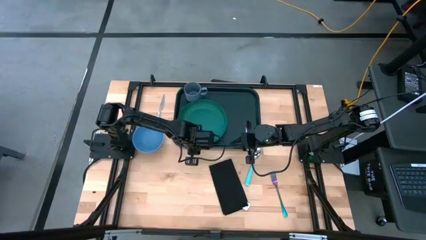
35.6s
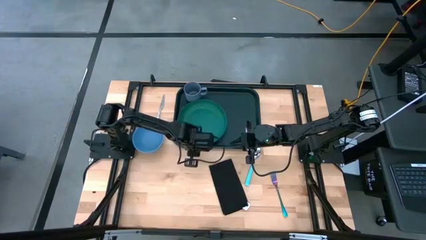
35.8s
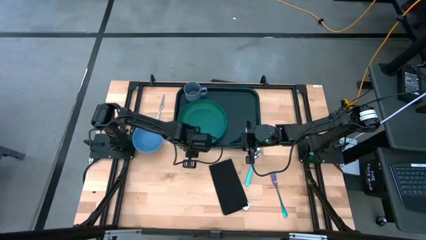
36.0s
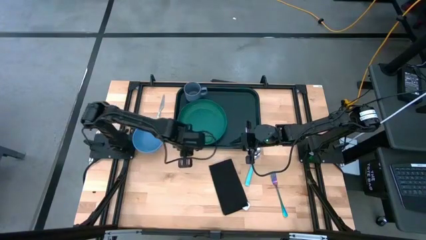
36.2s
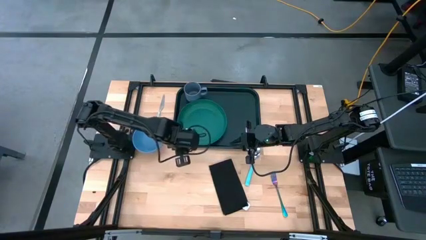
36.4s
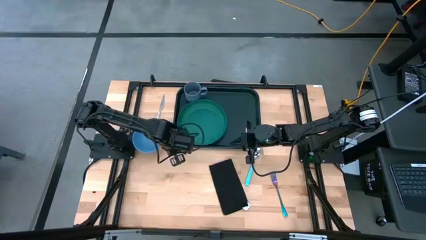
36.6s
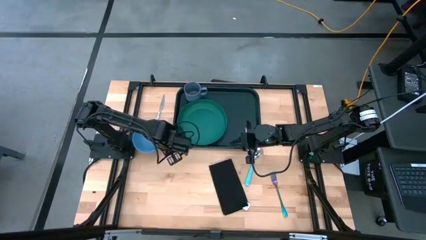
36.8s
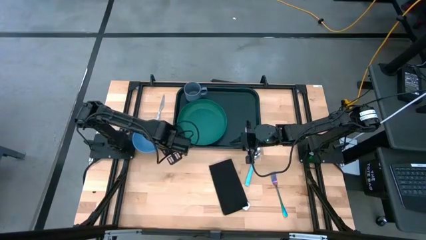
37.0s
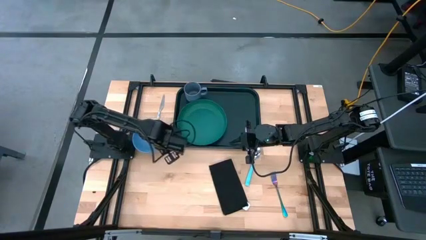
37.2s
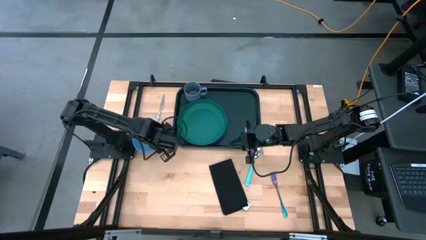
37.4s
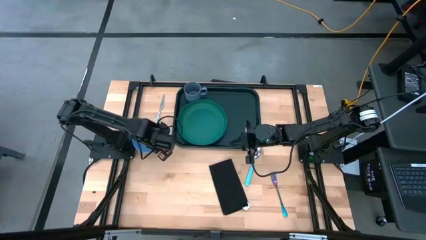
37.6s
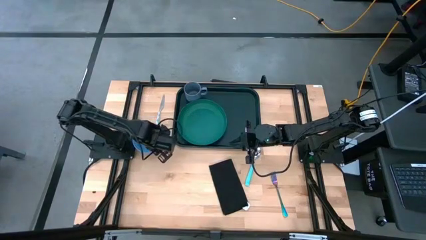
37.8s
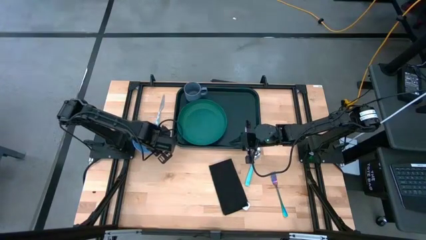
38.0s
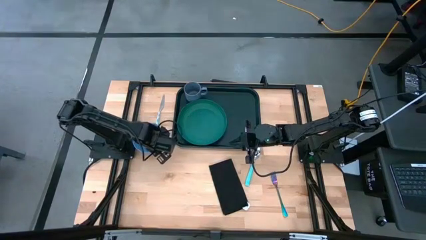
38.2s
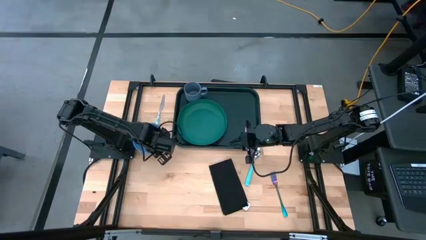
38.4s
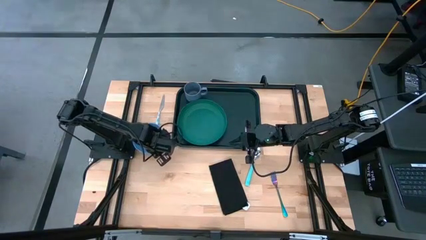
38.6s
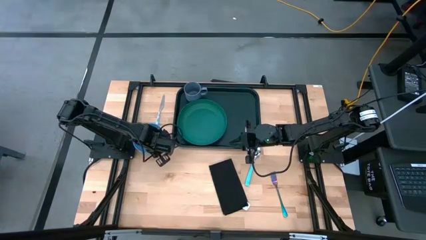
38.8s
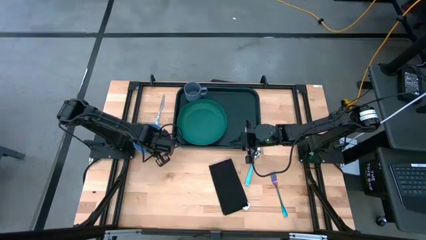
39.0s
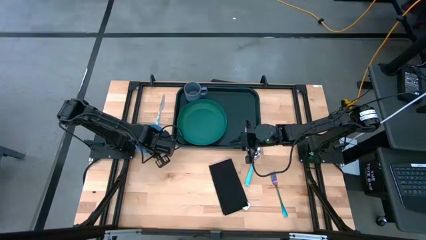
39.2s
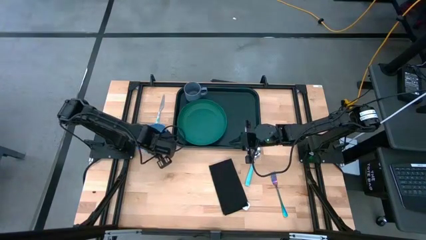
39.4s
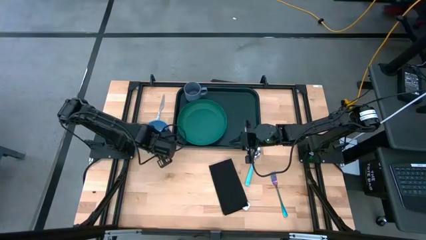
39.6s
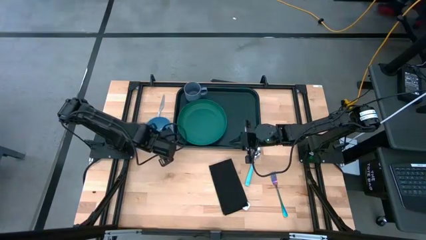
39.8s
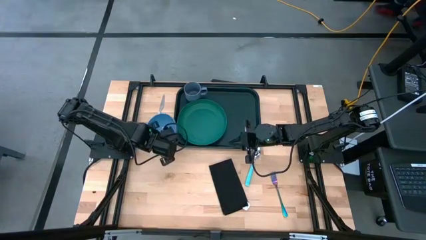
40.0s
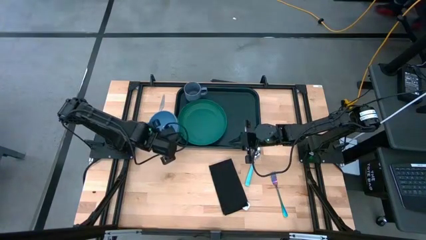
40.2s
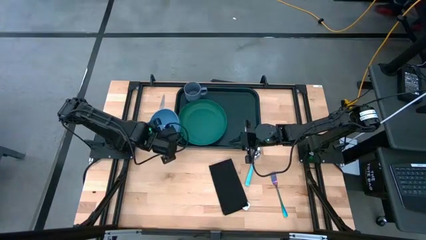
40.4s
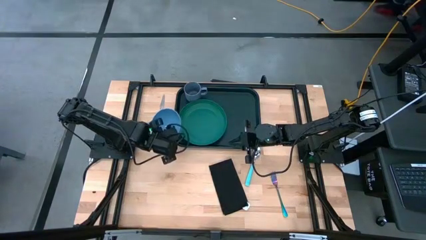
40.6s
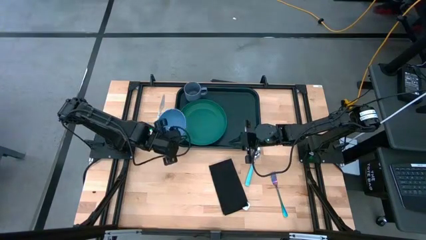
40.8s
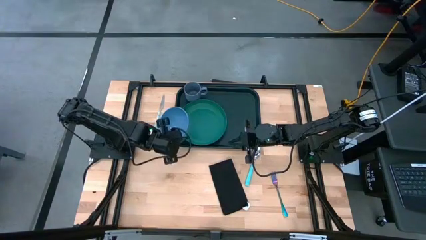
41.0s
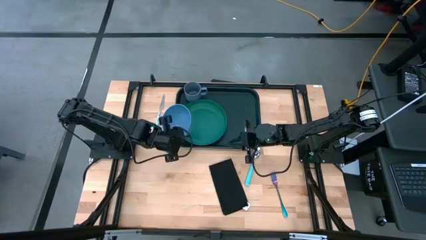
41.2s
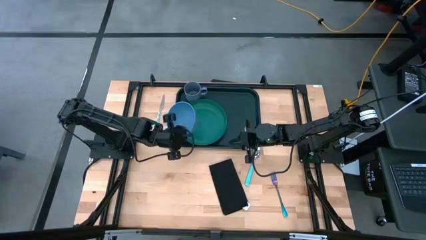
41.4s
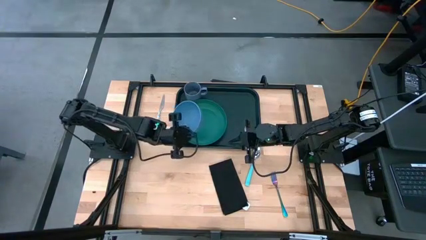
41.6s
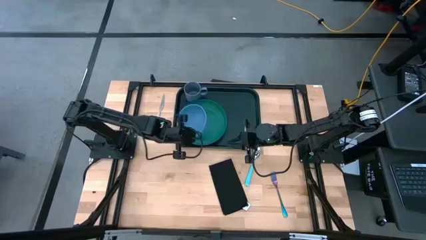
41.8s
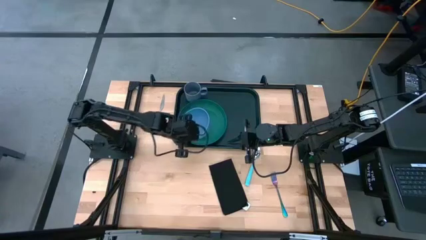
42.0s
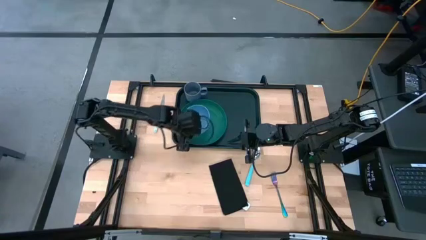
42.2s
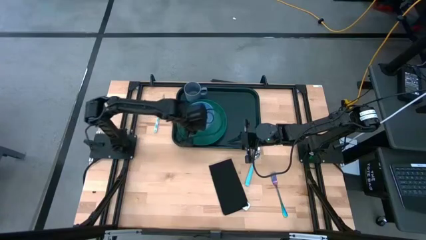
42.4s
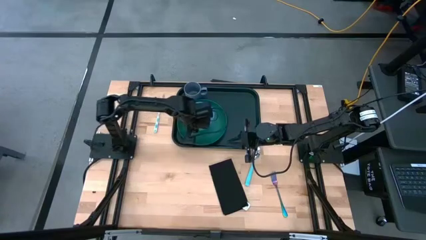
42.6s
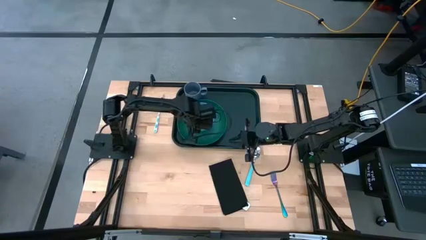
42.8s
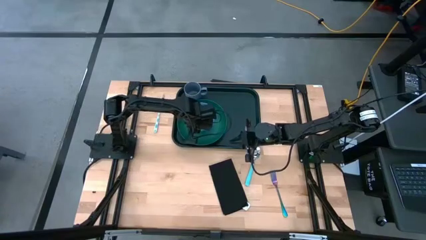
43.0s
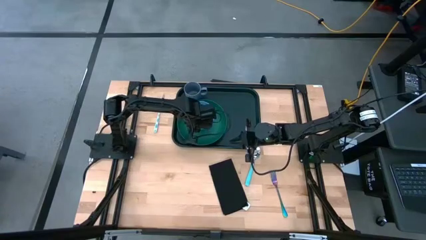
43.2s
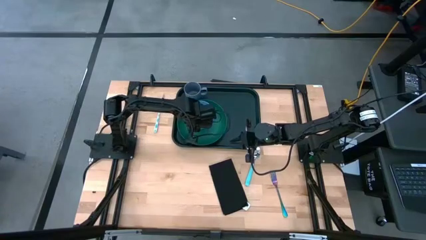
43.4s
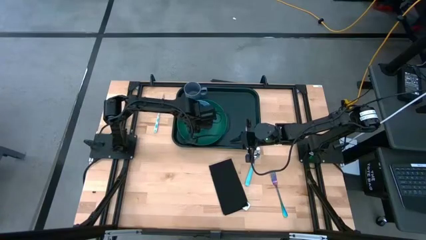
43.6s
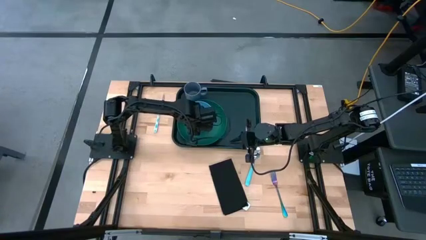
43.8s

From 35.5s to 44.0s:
Task: Set up tray
Put the blue bowl on top of the green plate on the black tray

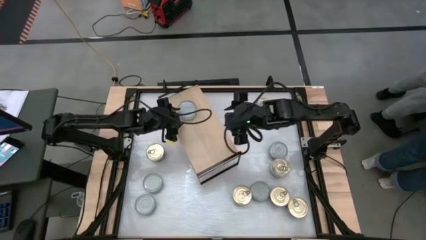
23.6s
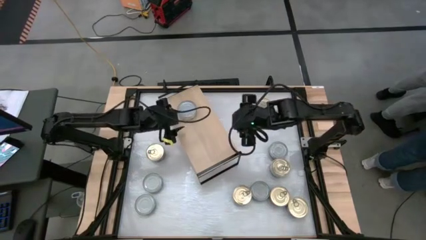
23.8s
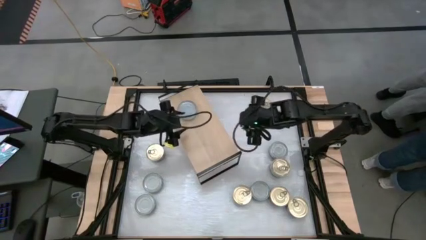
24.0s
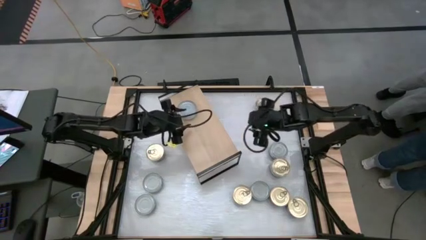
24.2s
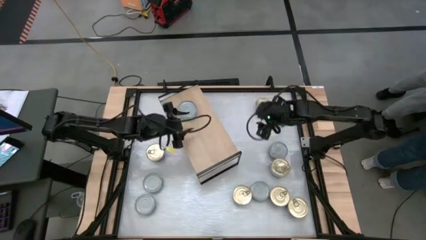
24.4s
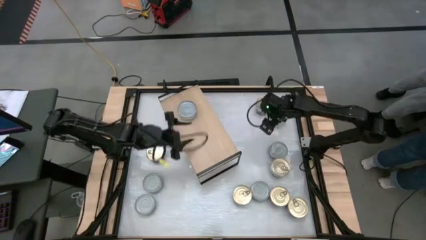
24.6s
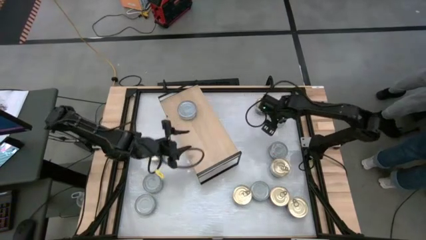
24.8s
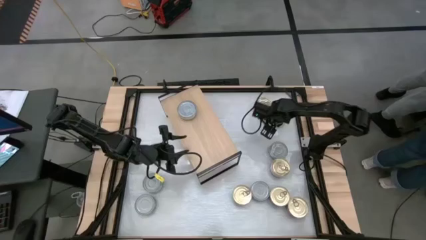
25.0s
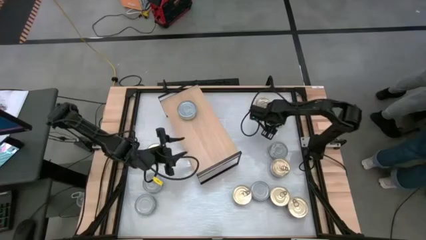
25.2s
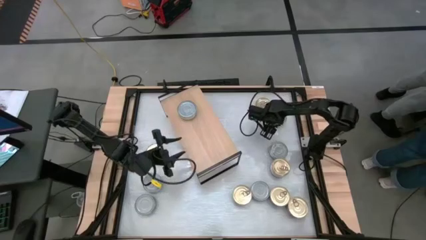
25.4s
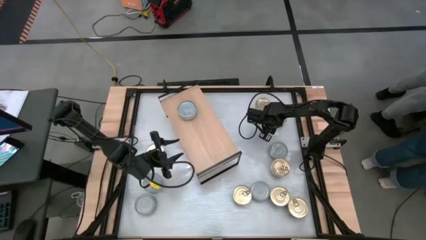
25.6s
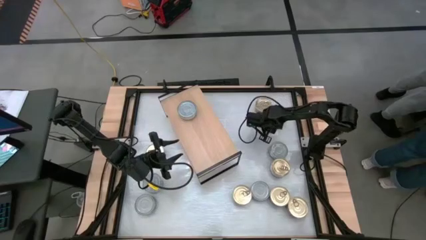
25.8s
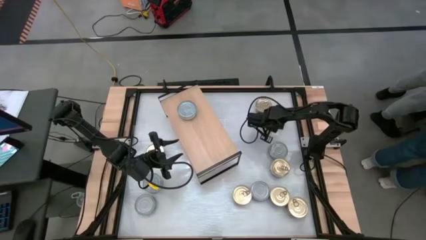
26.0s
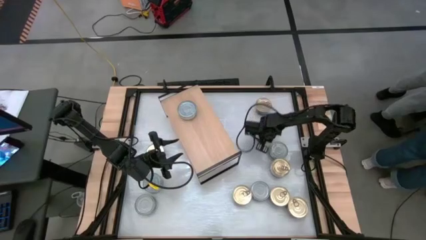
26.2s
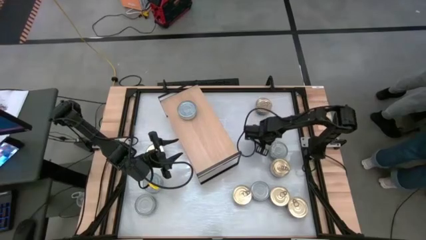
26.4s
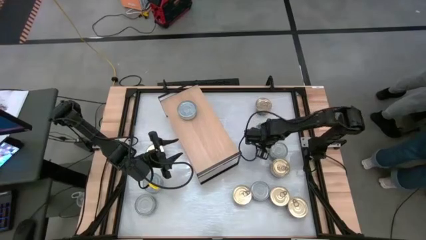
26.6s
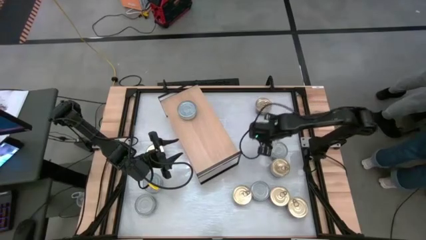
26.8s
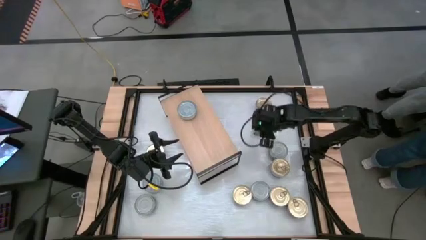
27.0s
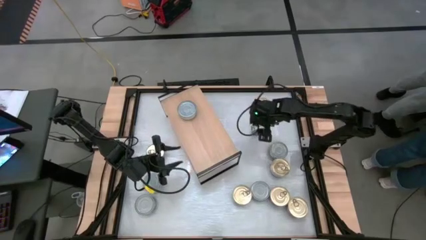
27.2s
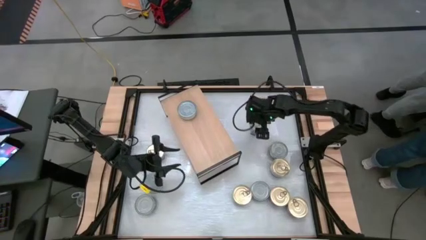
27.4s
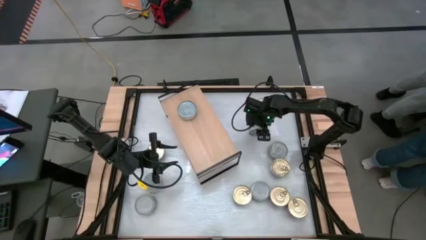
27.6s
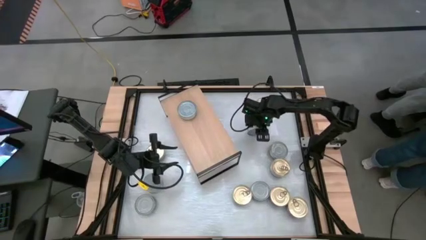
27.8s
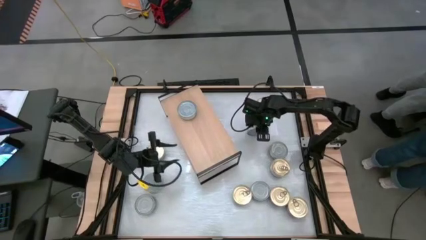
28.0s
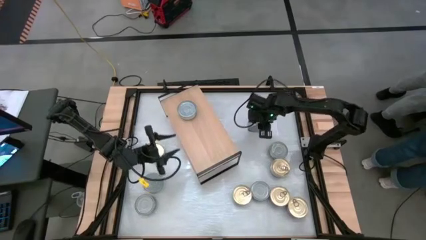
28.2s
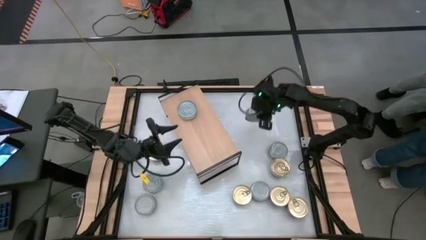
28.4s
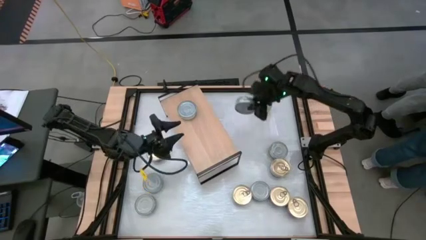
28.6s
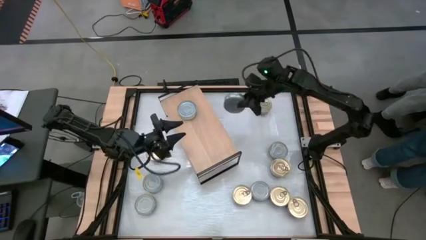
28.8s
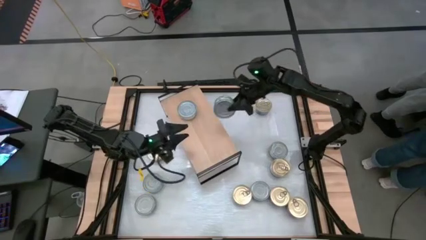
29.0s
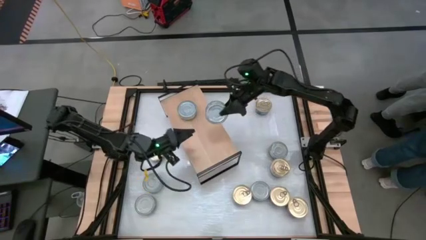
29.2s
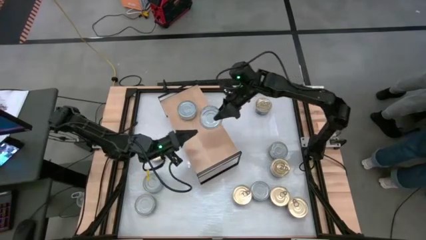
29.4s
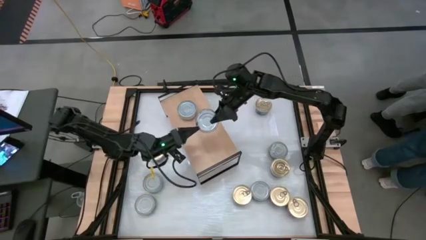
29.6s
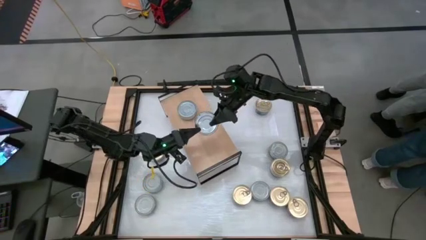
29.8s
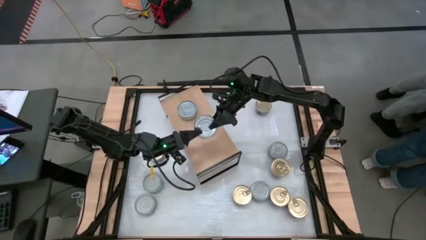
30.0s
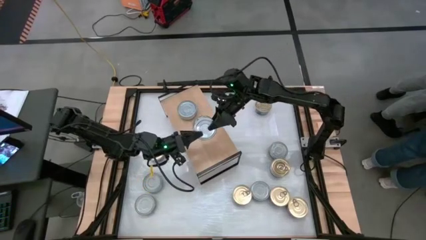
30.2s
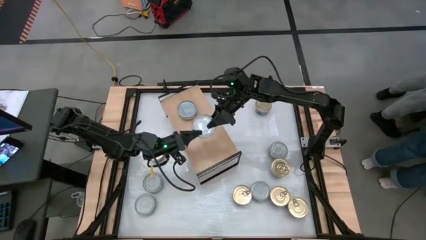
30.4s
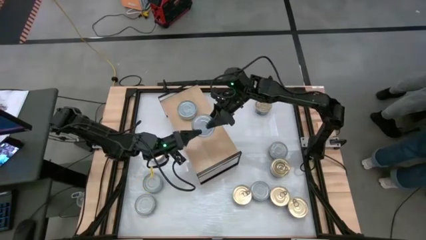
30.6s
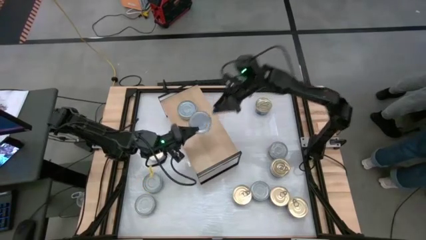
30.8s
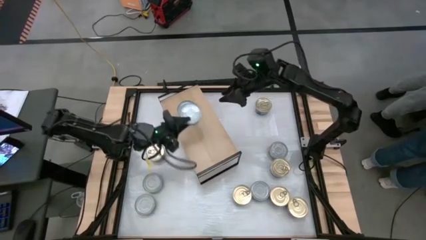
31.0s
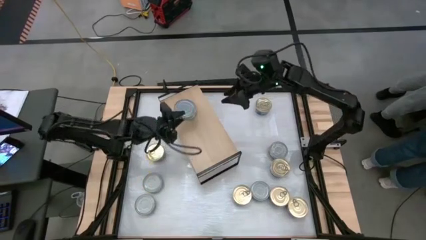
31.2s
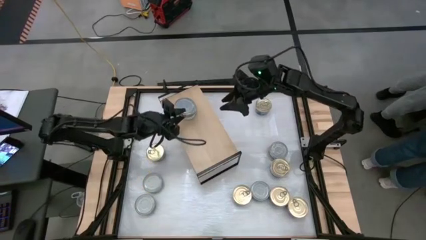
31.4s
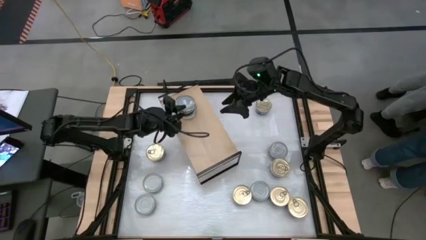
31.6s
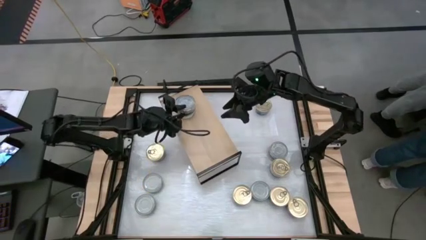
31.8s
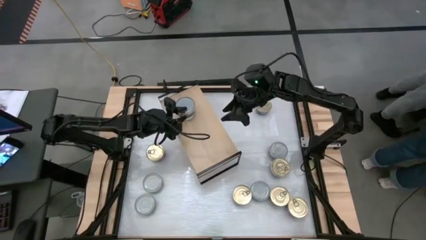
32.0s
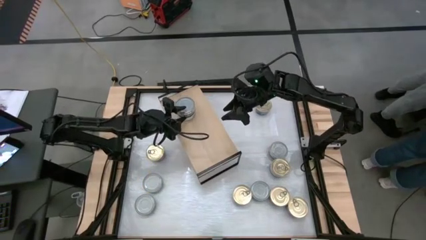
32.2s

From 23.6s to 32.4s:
Task: Stack canned seafood by type on shelf
Stack the green tuna can on top of the other green tuna can on the shelf
